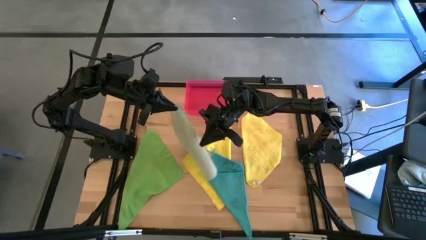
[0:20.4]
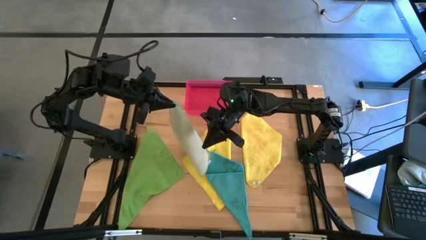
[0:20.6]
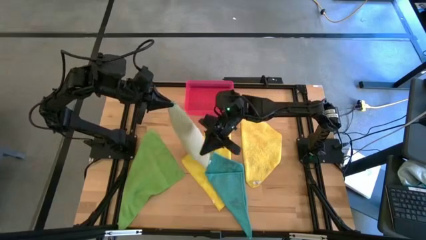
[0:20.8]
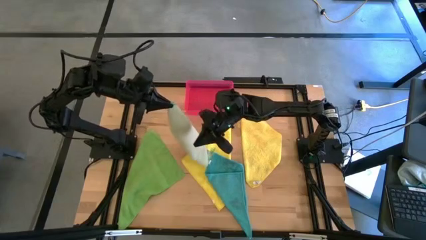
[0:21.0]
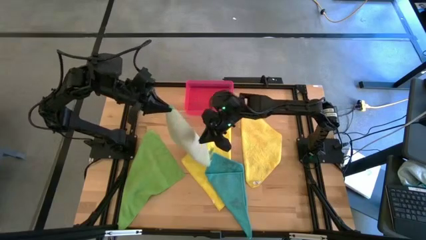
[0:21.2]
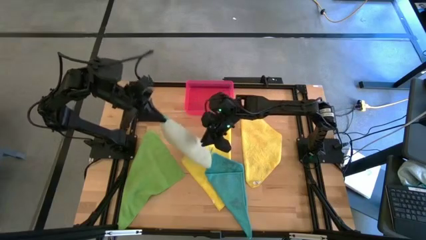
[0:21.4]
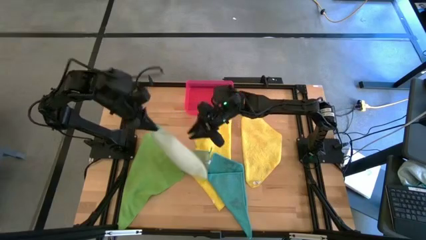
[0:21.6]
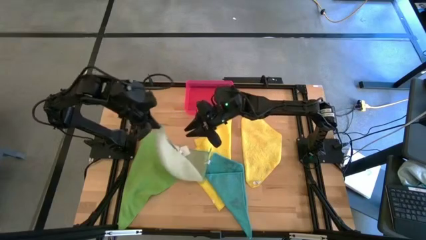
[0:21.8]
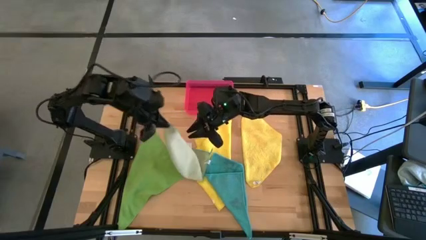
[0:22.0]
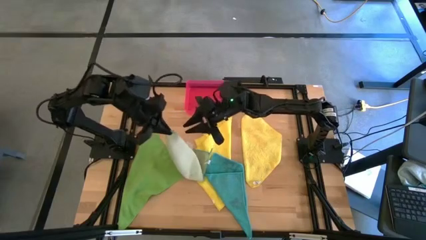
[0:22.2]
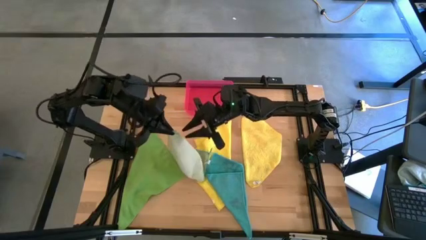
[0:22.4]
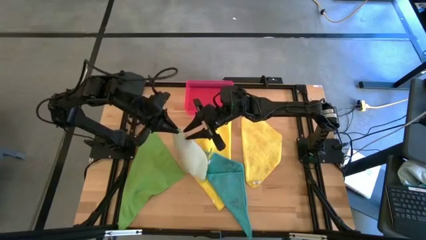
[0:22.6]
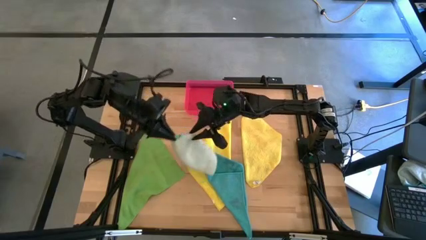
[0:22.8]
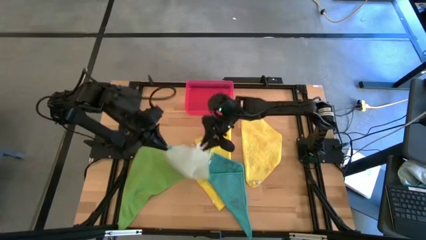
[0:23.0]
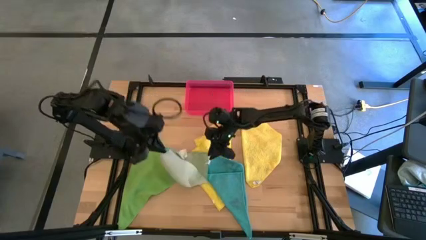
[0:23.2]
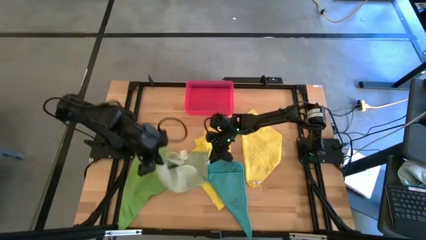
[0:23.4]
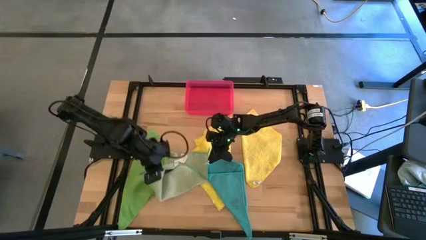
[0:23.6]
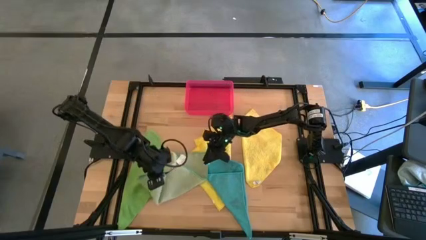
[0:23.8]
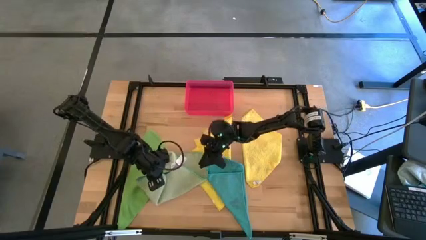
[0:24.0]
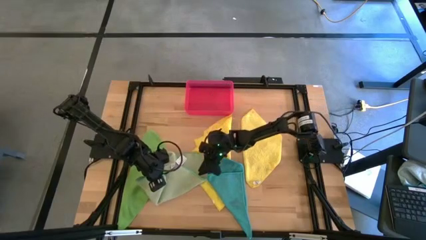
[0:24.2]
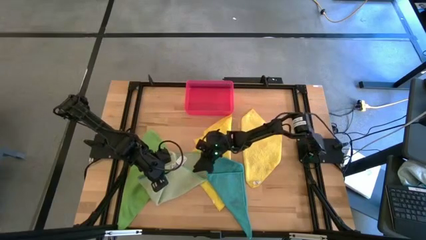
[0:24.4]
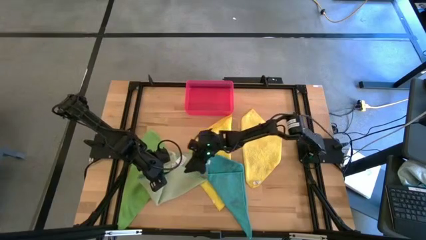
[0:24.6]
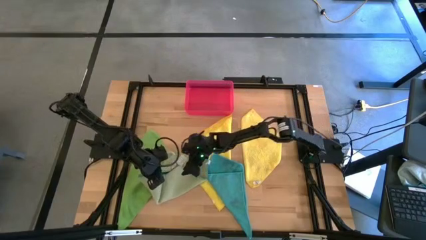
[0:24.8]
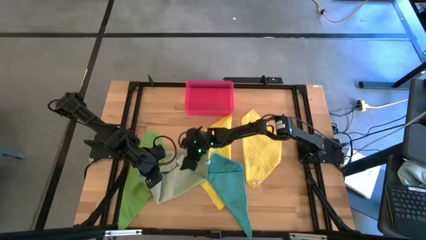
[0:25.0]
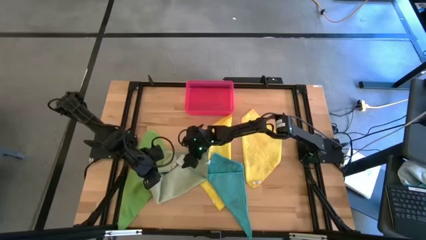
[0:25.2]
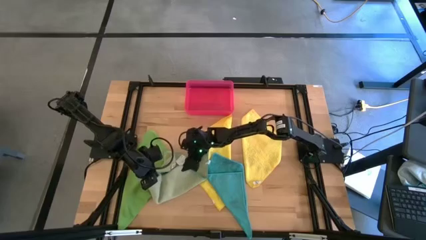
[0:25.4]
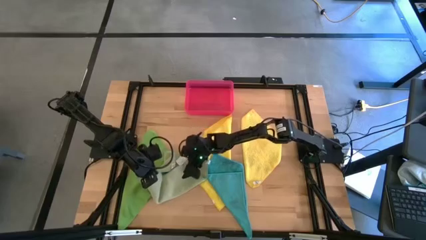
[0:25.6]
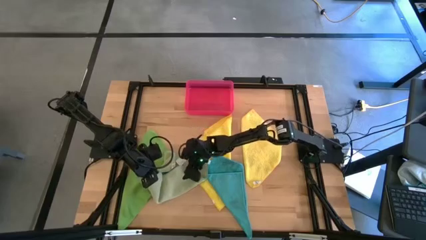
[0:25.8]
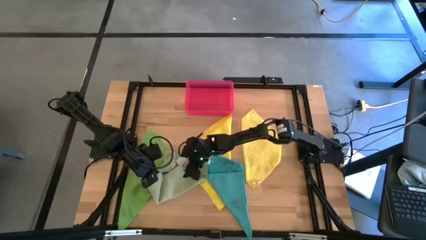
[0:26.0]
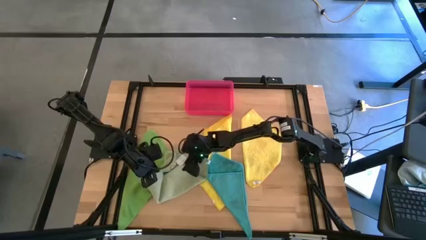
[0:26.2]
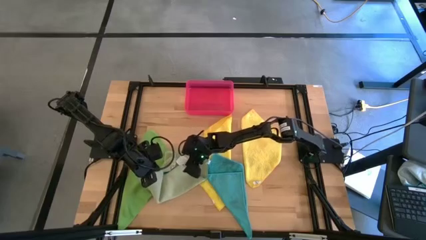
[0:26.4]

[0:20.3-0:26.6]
Task: Fold microfiber towels
Fold the light green microfiber cloth

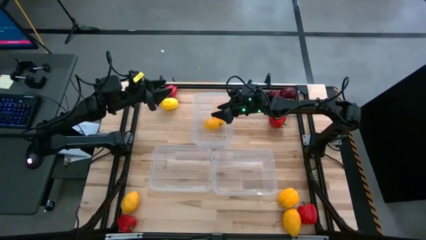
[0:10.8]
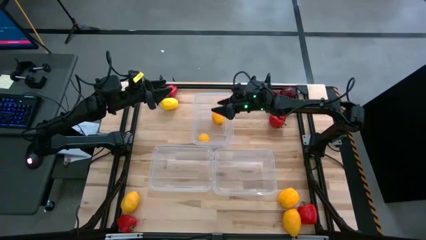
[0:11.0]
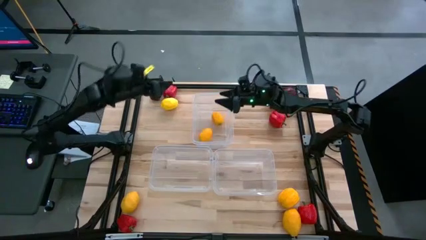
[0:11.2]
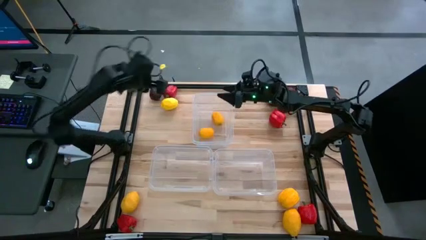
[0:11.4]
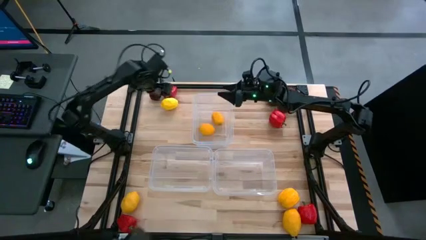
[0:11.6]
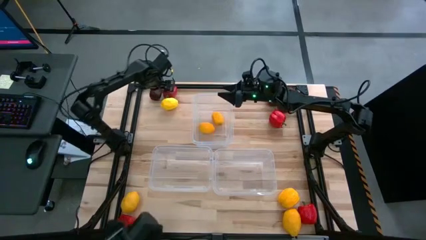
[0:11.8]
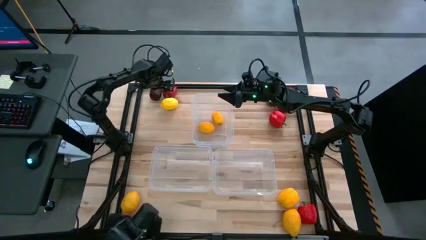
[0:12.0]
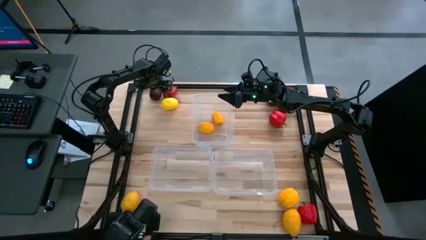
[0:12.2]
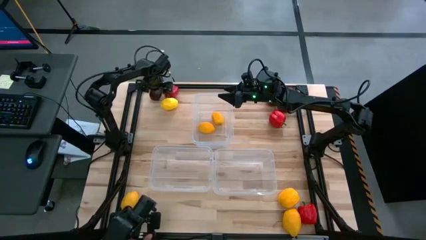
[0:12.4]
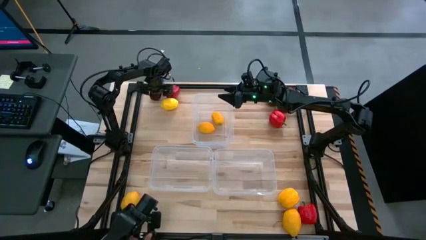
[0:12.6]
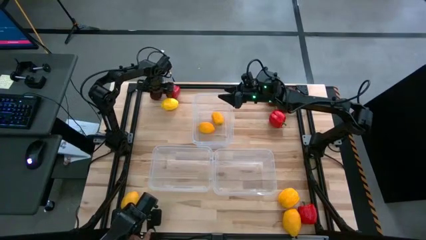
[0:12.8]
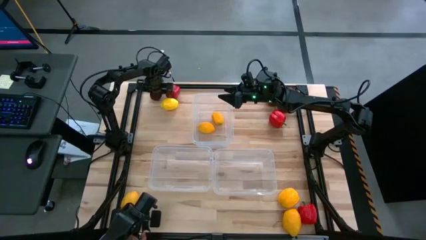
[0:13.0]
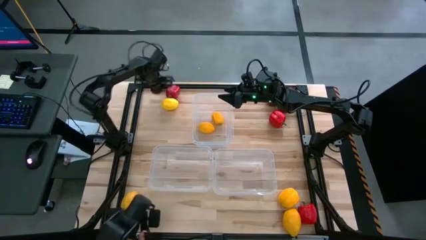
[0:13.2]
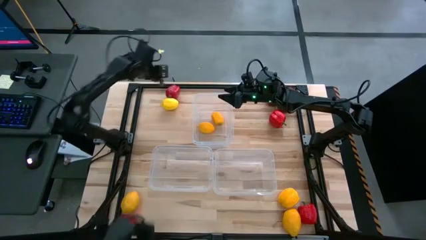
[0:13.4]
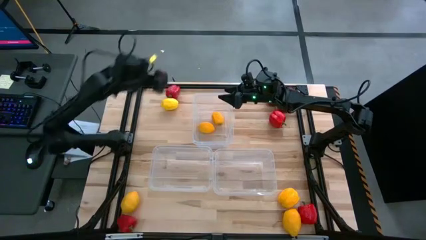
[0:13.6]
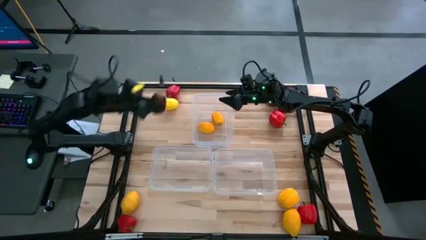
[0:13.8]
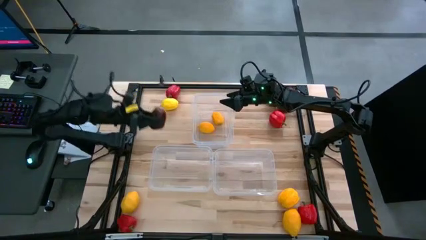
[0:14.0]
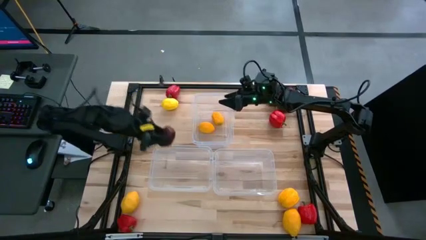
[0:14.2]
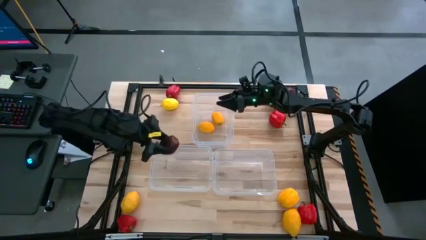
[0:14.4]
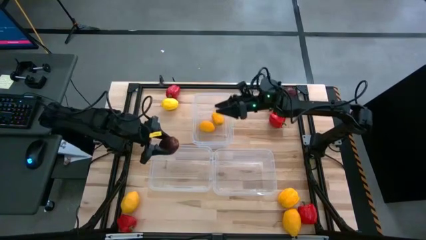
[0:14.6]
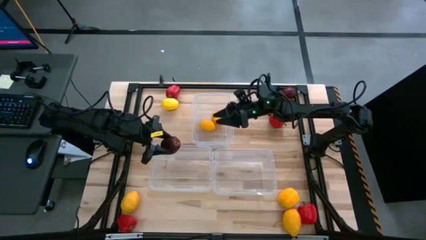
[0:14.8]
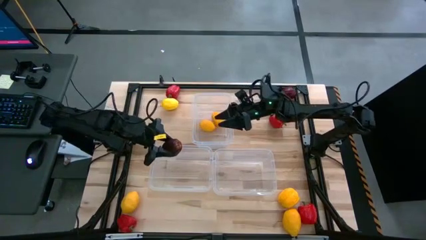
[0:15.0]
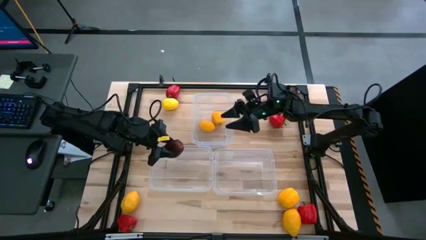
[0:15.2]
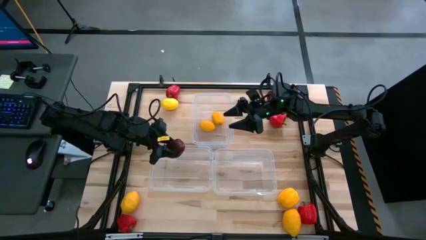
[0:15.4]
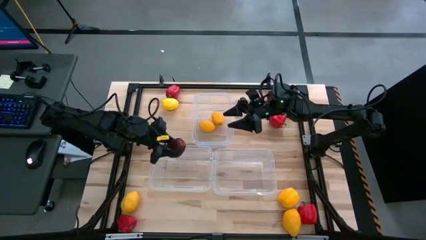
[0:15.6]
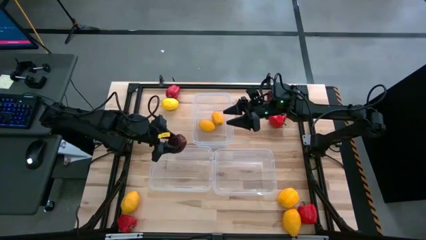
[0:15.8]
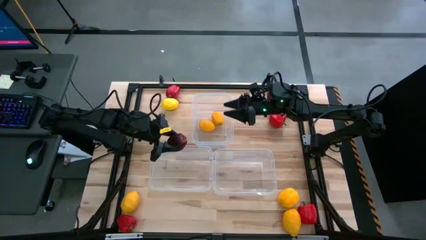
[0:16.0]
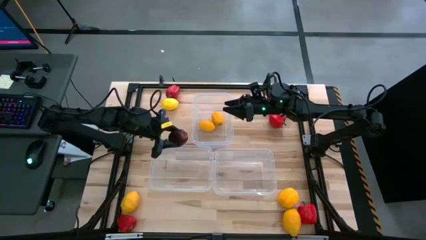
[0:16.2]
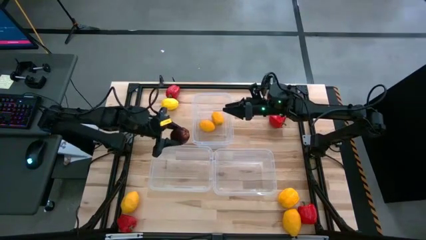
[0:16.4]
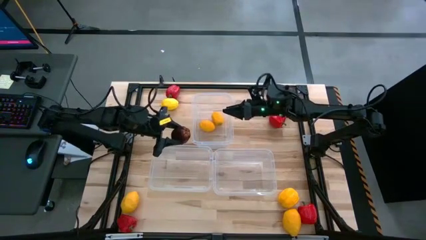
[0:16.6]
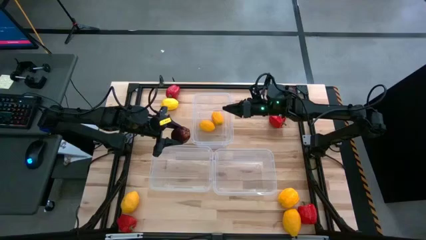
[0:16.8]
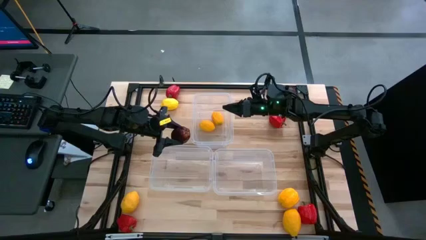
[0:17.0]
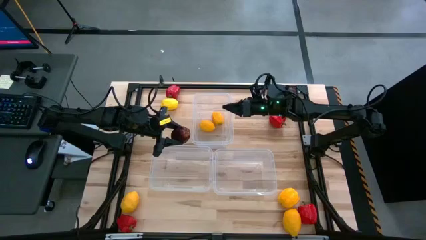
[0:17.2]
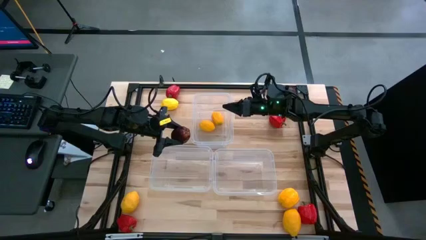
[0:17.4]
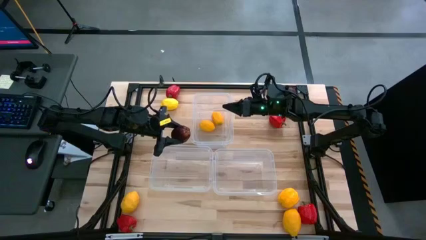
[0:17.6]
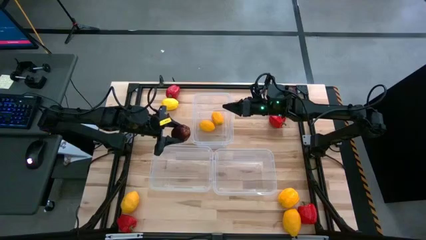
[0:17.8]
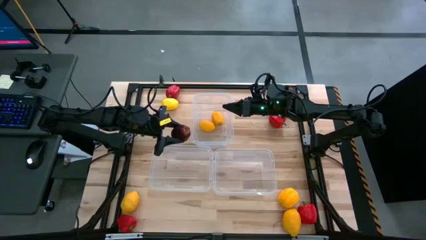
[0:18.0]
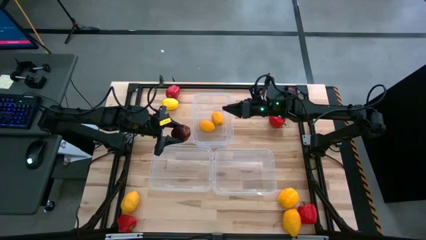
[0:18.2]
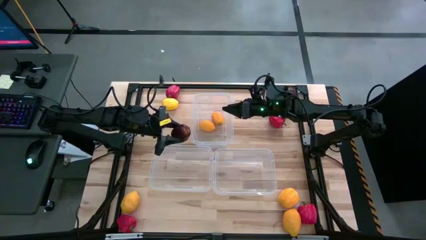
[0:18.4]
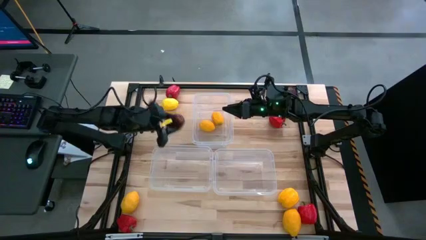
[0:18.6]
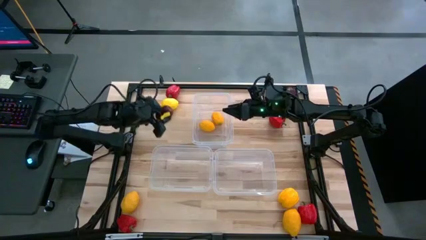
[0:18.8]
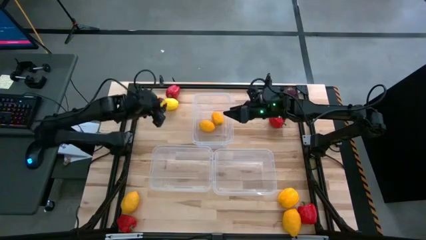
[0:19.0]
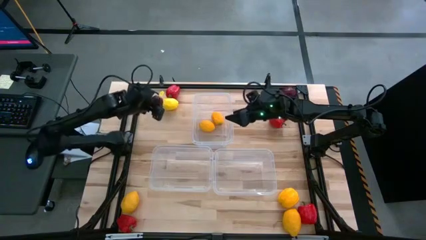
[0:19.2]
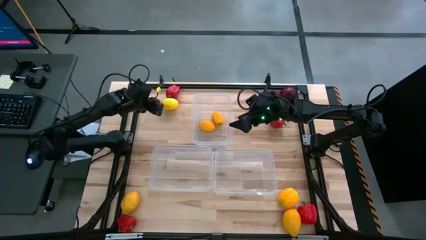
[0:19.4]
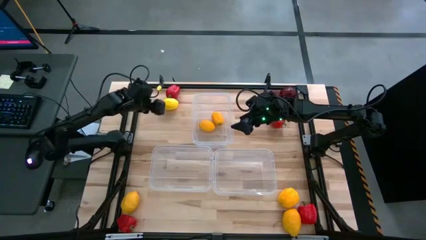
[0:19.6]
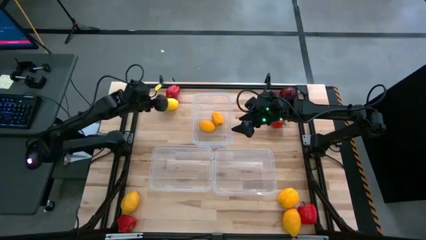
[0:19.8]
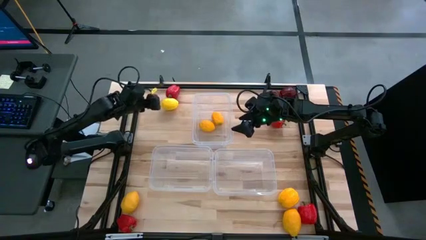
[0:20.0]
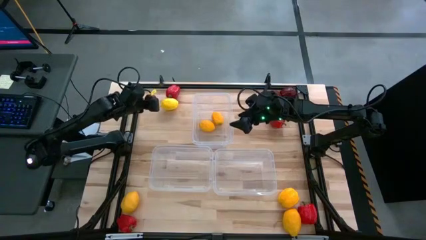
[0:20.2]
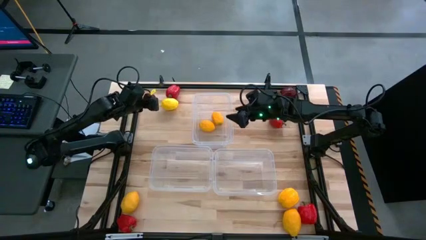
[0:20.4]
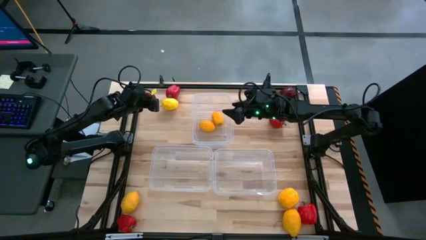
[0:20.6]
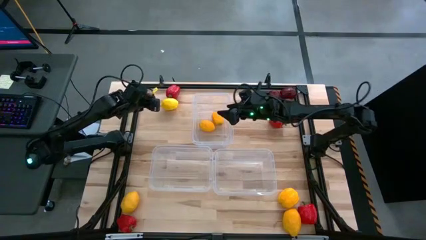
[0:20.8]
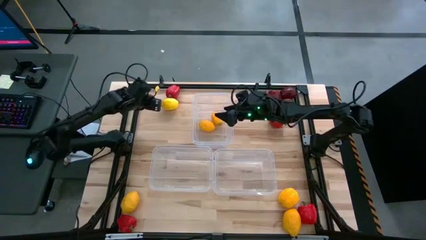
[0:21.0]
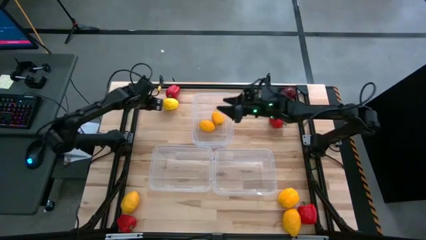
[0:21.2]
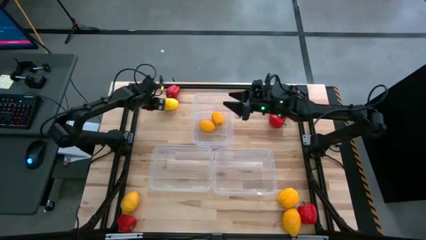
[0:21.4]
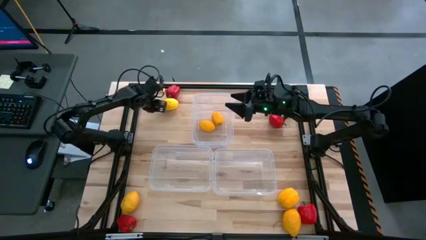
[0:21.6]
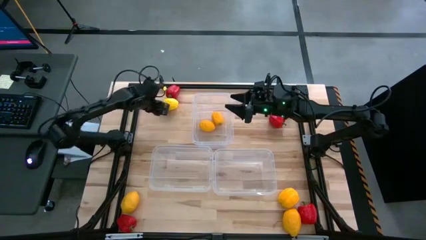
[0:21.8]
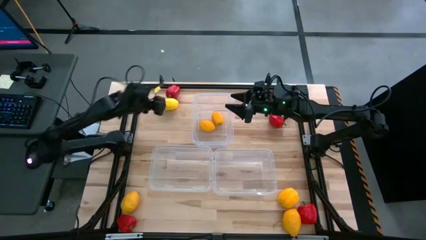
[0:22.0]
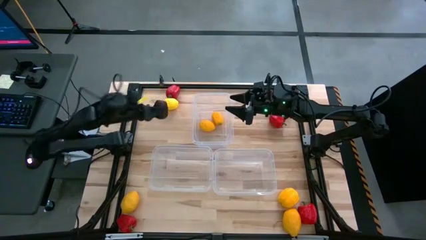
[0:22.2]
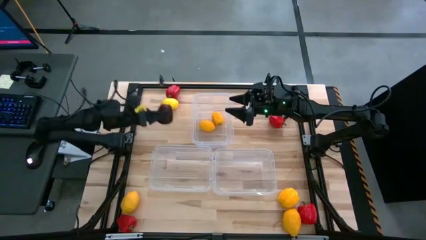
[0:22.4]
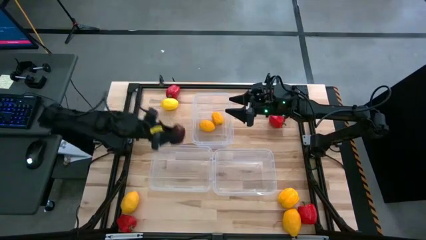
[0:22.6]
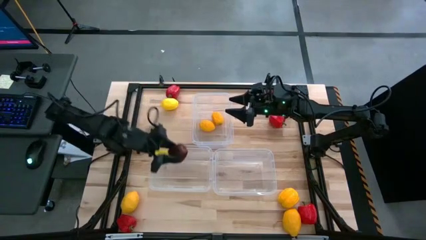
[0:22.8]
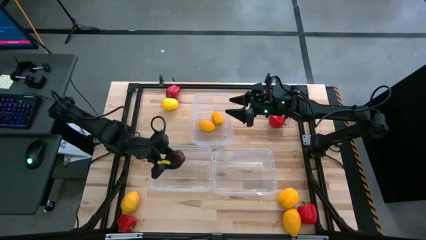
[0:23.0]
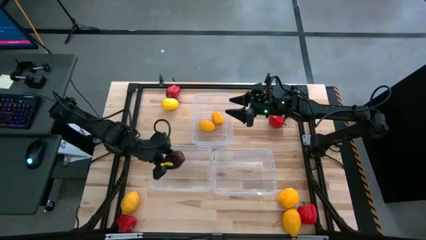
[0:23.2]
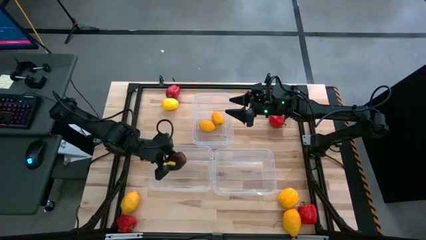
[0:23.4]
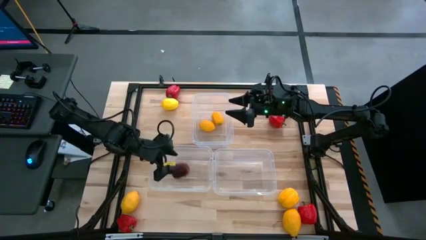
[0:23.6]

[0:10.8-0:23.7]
Task: Sort produce into baskets
Put the red apple into the bottom left transparent bin
